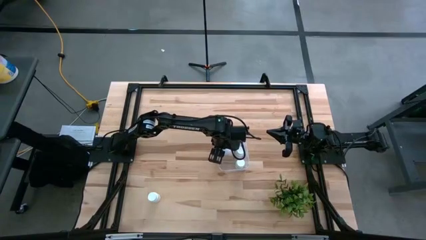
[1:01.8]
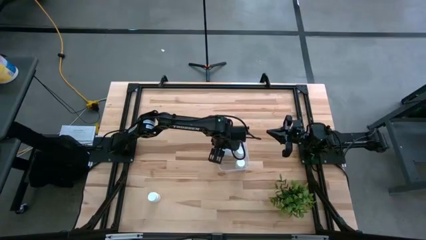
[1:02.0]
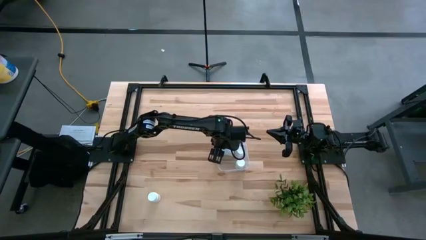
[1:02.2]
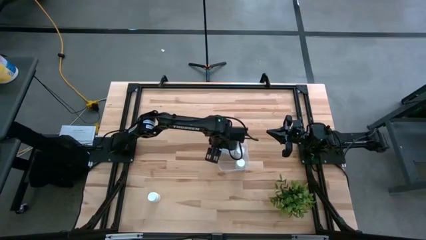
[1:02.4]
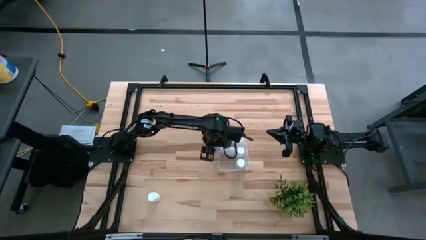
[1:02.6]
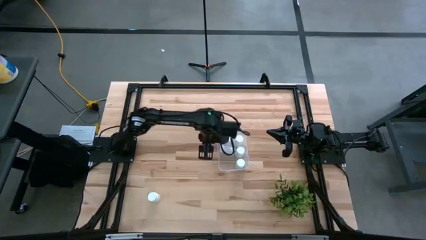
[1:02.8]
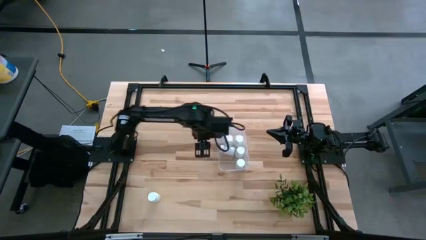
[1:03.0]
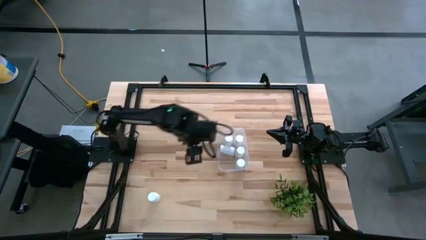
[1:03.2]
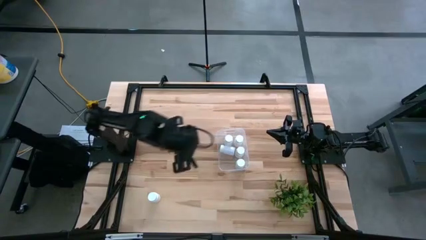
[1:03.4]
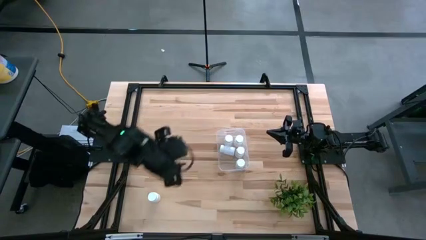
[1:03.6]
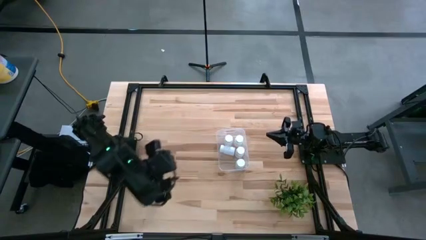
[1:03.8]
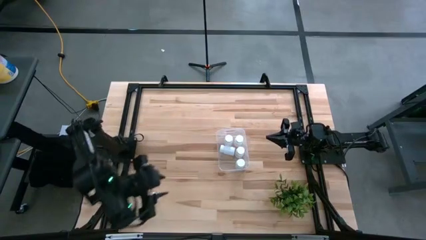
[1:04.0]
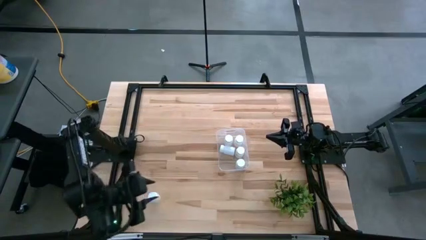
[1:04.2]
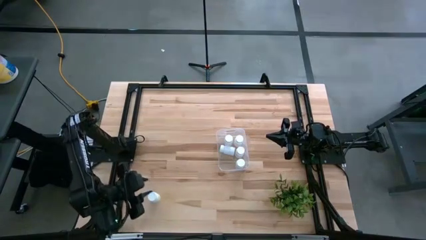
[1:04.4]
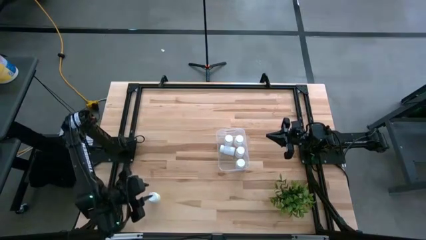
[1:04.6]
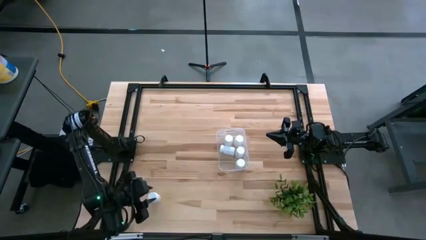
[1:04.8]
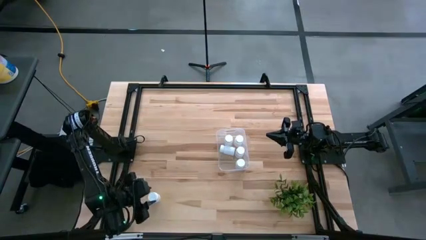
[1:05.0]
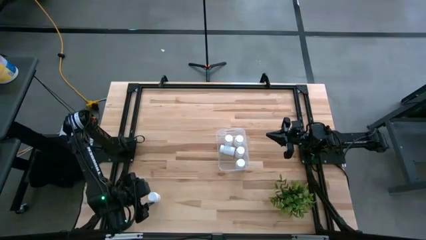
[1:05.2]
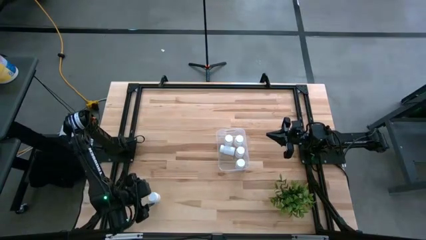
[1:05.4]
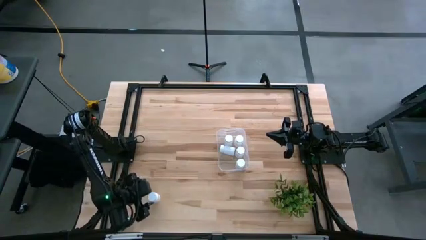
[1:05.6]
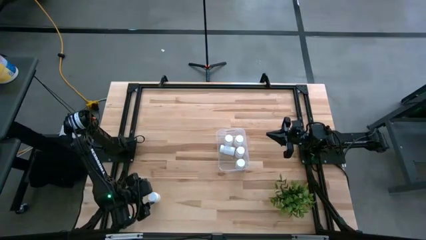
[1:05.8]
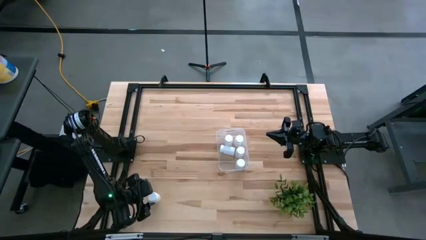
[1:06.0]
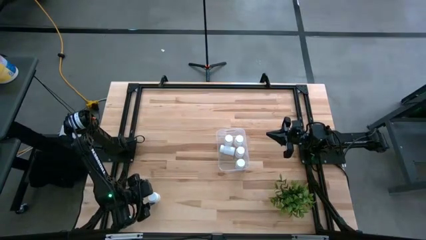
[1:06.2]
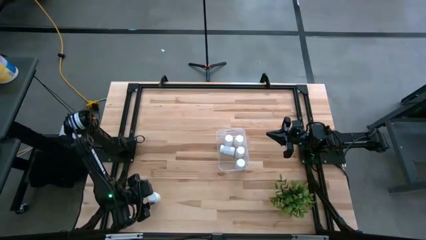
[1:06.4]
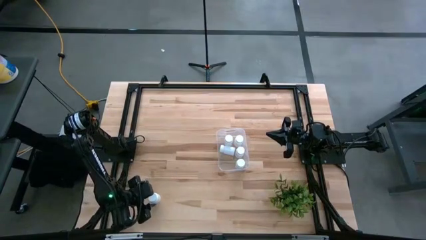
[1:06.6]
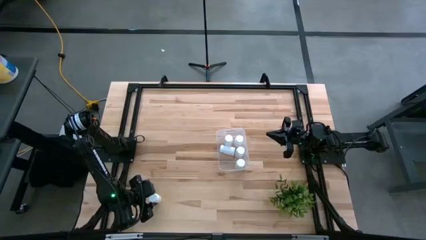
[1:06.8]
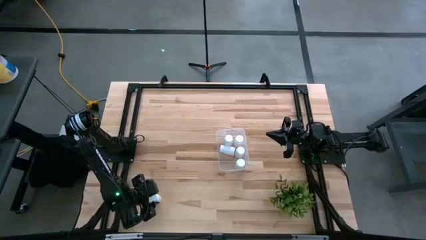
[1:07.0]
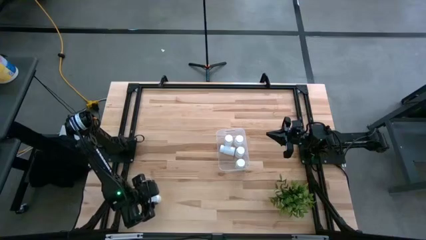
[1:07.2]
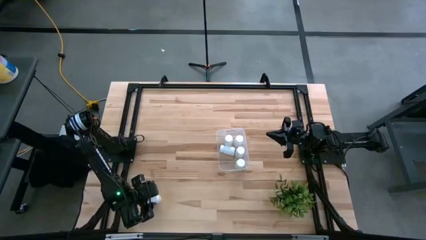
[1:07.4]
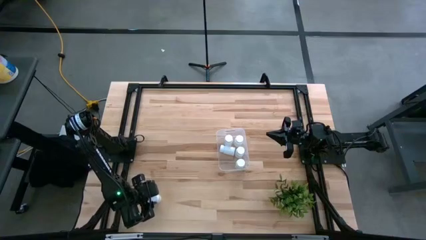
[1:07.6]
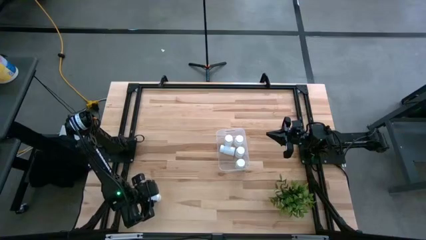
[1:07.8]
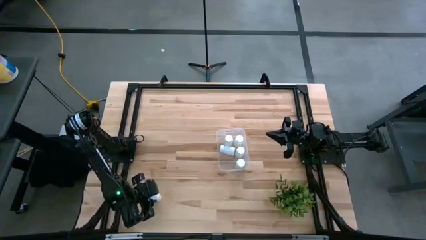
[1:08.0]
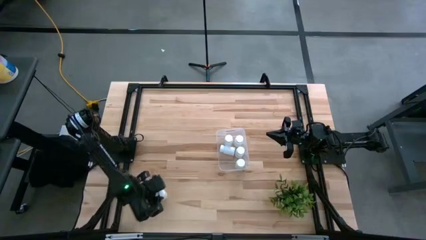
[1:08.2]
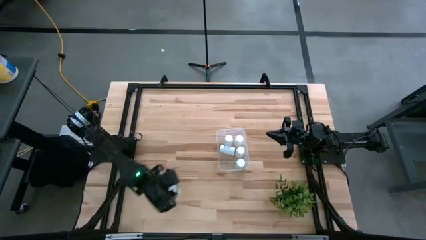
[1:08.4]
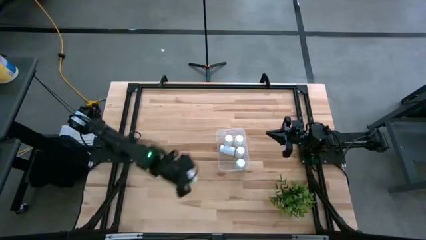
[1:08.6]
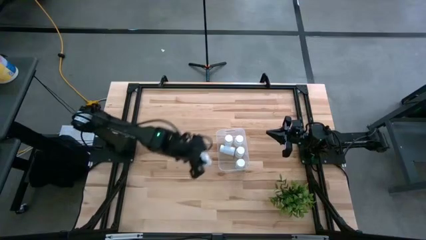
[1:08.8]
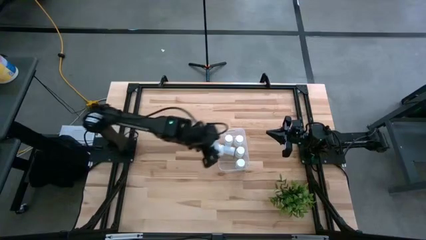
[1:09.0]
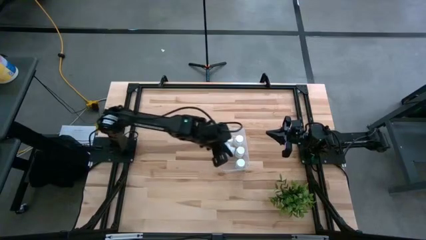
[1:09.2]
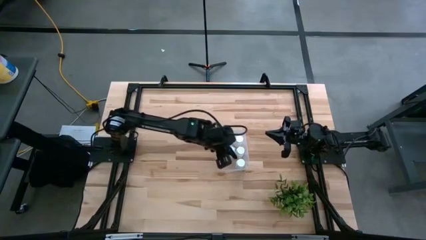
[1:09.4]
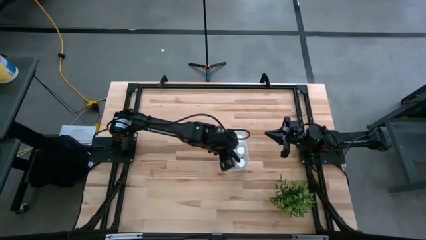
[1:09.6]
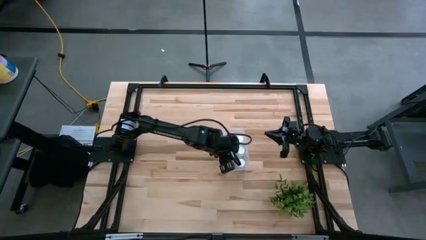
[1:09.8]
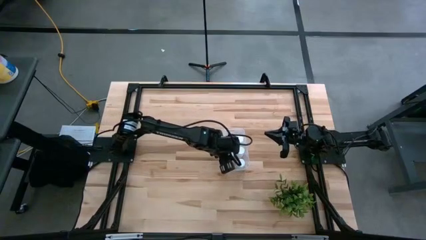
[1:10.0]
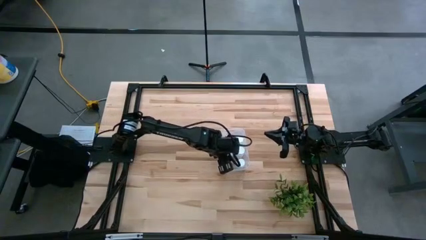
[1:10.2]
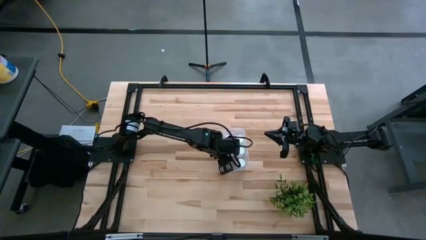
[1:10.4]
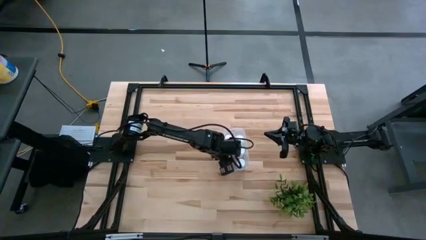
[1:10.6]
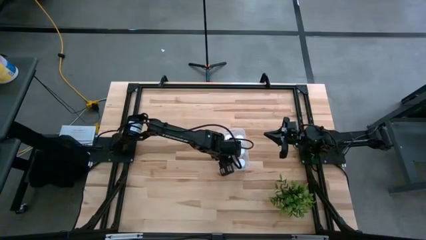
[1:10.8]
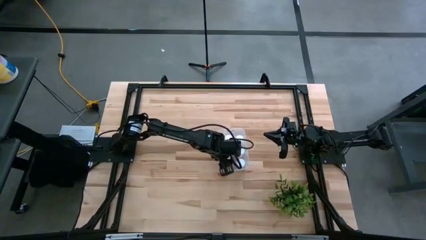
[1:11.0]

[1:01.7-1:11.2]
Task: Pick and place pill bottles into a basket
Put the pill bottle into the bin

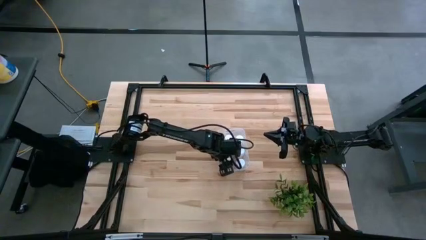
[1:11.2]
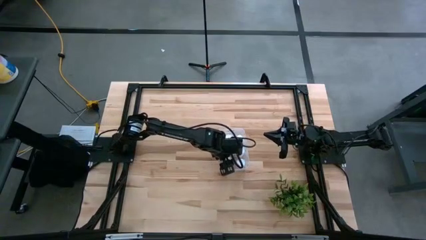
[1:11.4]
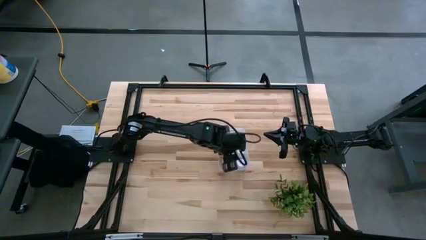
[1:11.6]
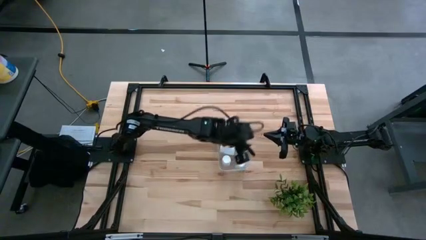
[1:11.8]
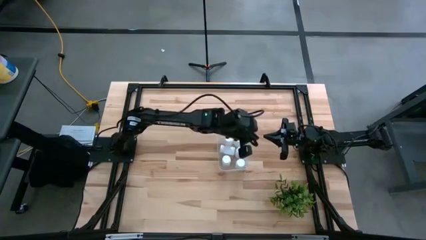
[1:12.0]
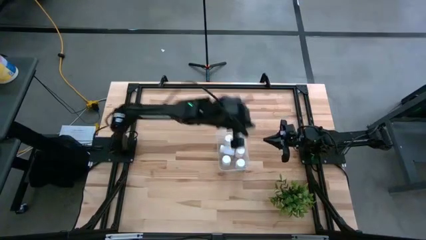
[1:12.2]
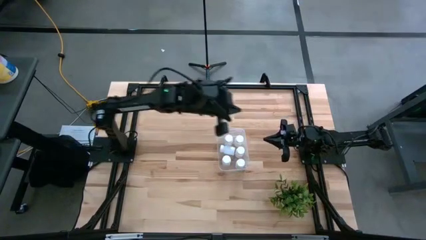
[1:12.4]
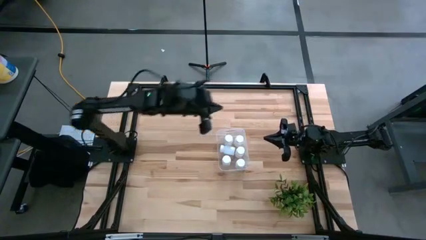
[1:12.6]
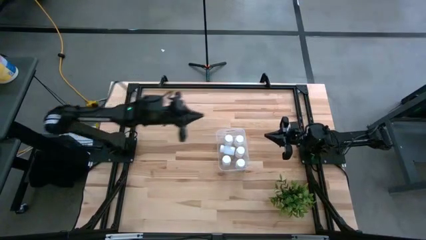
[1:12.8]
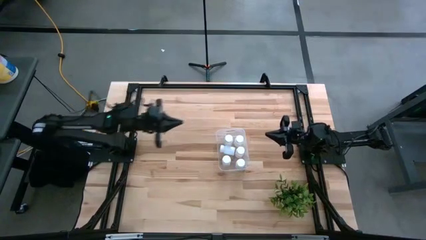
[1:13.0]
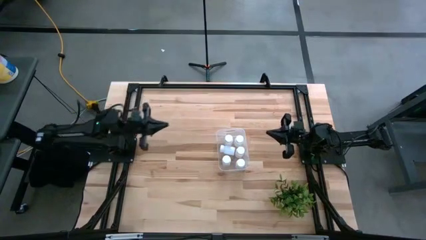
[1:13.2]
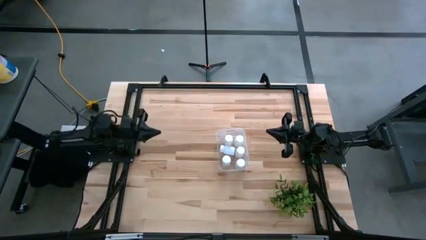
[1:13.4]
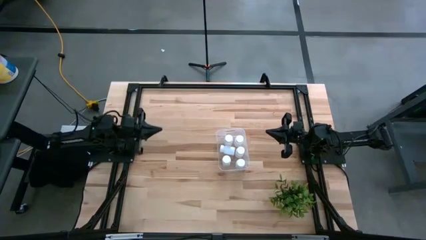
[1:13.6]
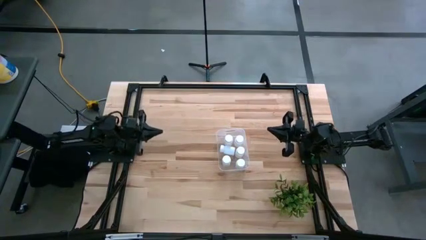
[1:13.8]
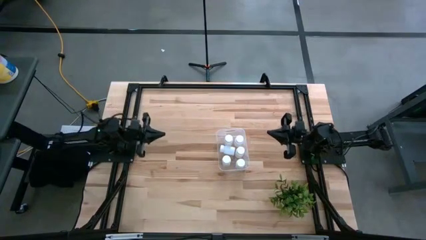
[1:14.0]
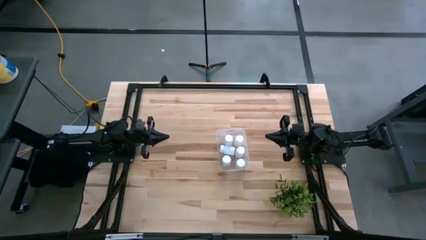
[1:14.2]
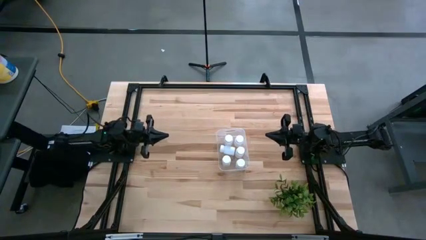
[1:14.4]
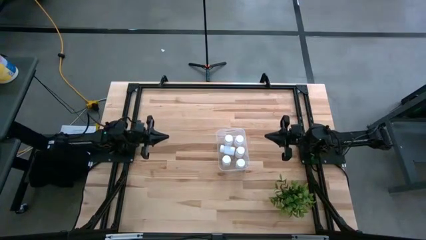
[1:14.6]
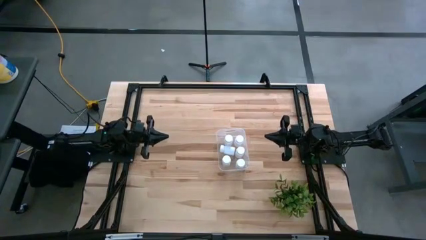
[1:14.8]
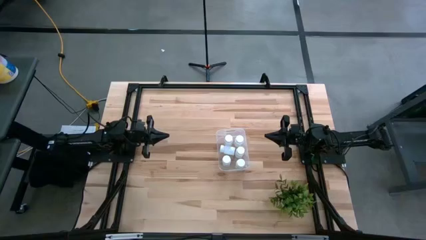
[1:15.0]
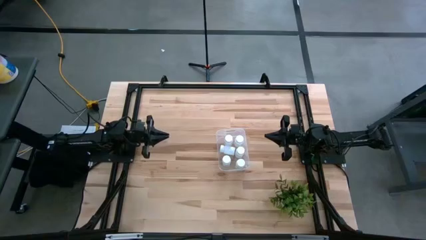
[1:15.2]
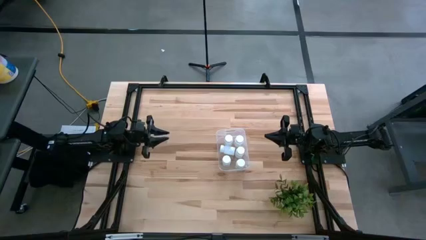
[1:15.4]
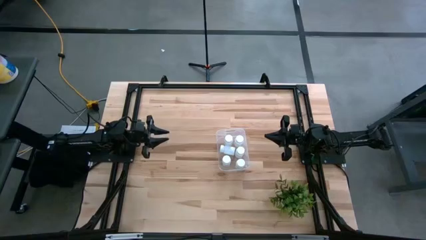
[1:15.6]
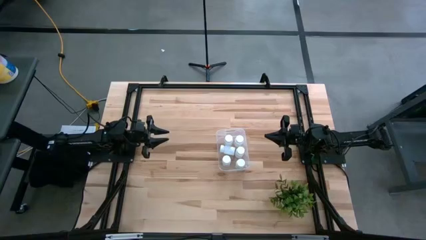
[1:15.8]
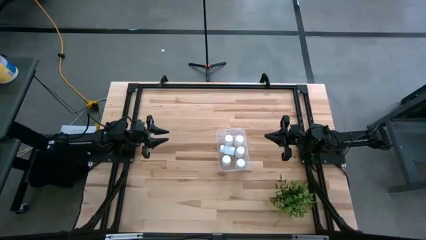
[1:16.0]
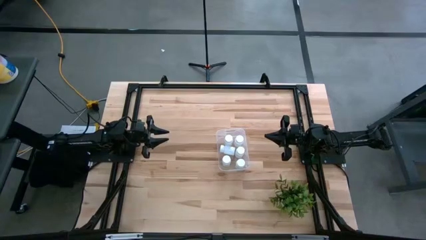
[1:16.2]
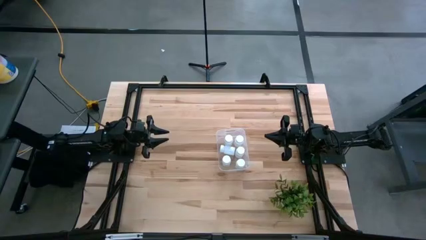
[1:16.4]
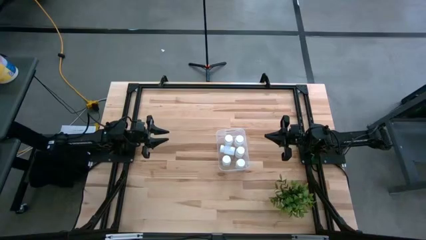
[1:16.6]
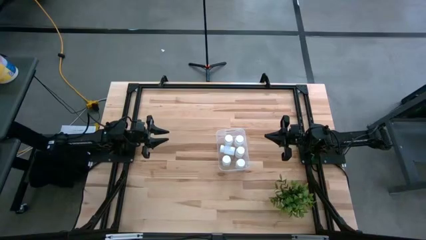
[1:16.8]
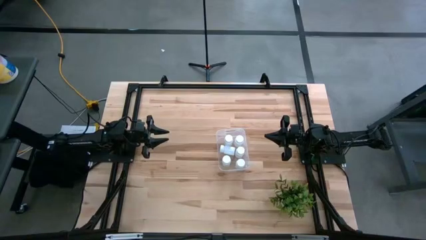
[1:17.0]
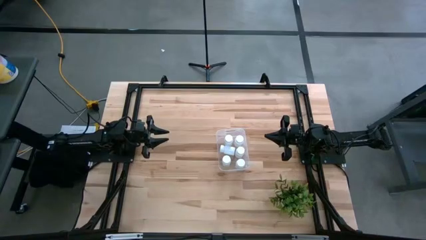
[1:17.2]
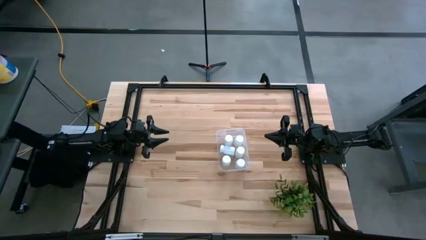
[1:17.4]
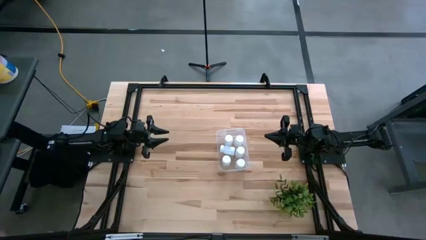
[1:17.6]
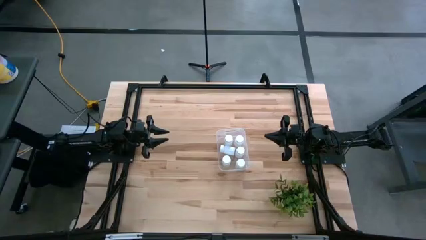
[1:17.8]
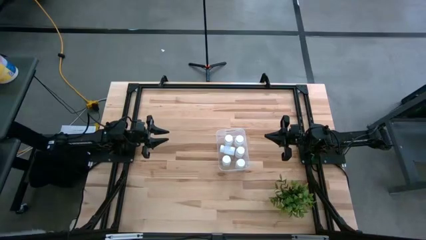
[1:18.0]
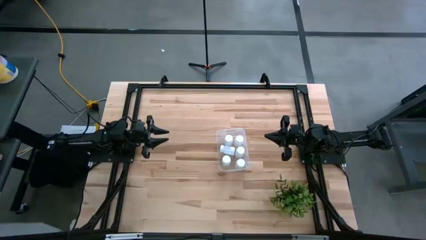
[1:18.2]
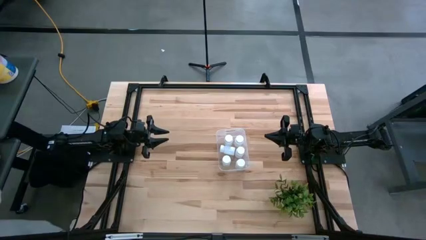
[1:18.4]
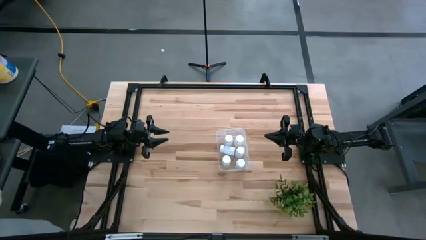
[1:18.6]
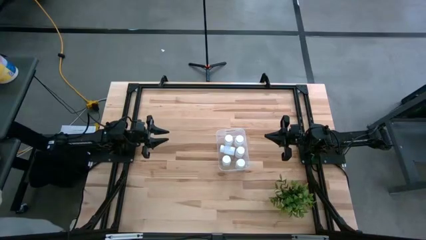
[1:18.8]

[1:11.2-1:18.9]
Return to Home Position

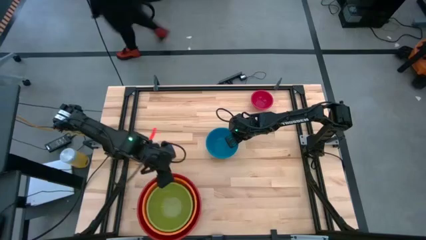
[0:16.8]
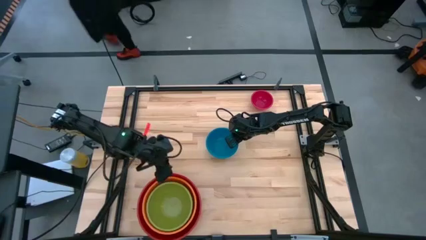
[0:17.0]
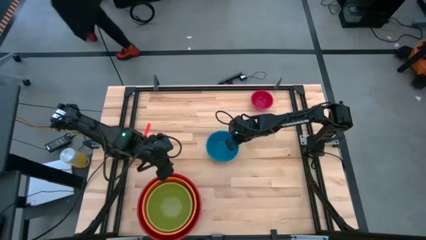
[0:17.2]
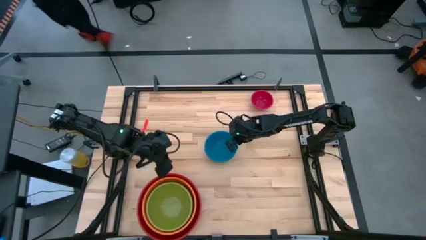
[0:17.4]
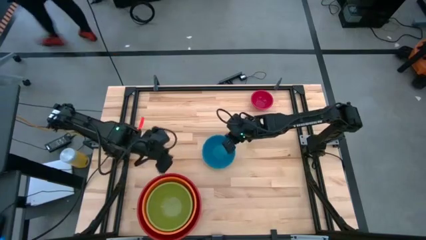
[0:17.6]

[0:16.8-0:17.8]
Task: Nest bowls inside each other by size order
Stack the blue bowl on top of the green bowl
